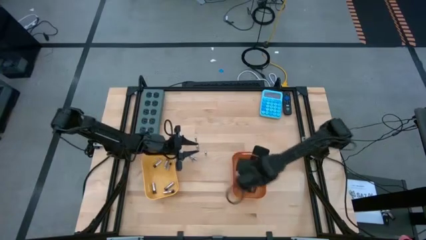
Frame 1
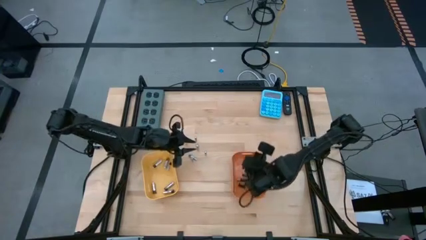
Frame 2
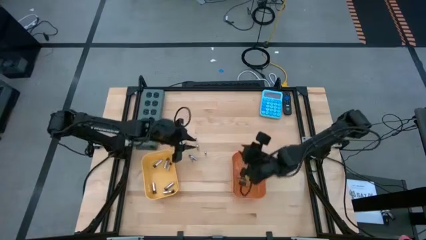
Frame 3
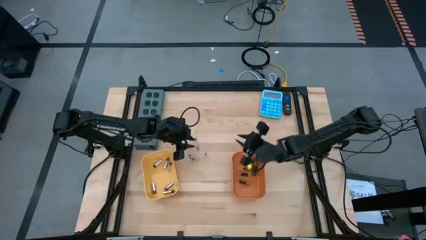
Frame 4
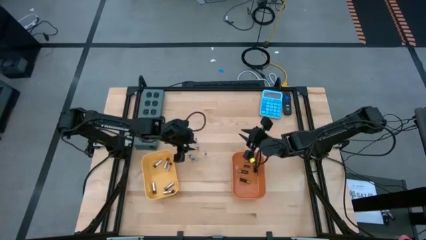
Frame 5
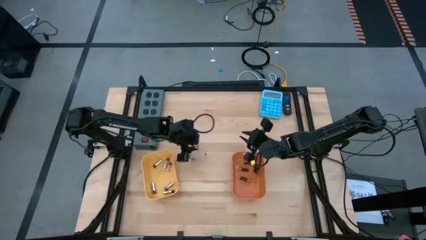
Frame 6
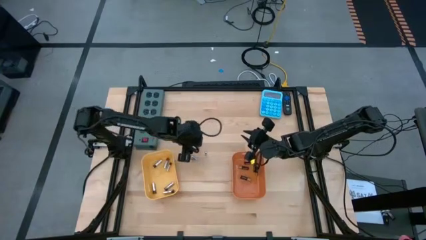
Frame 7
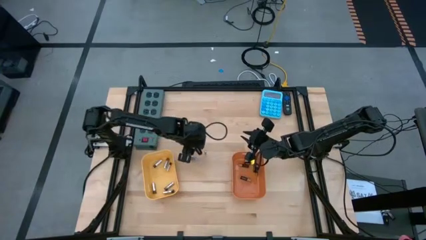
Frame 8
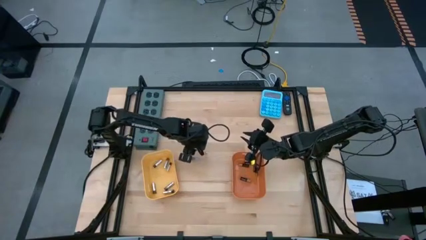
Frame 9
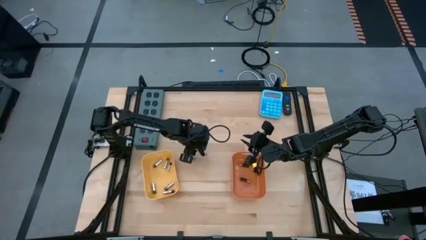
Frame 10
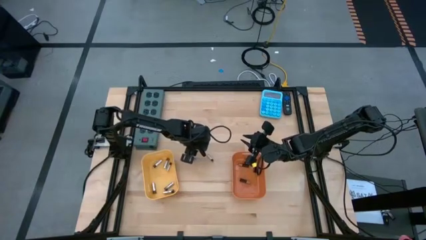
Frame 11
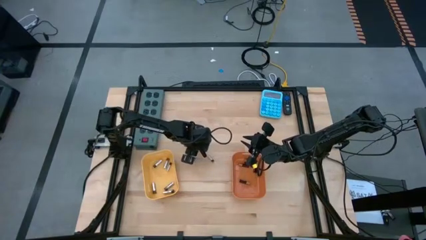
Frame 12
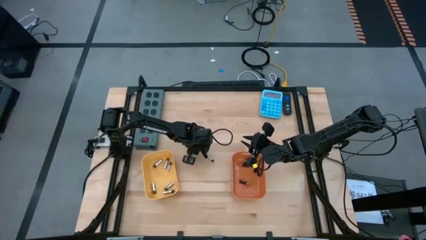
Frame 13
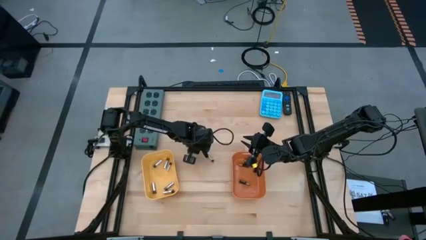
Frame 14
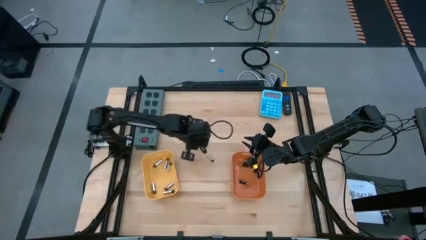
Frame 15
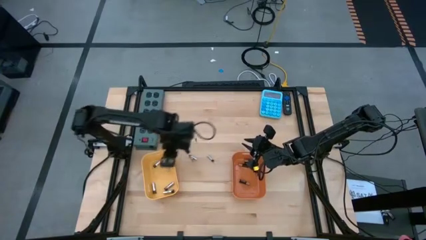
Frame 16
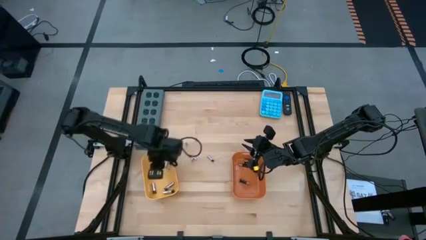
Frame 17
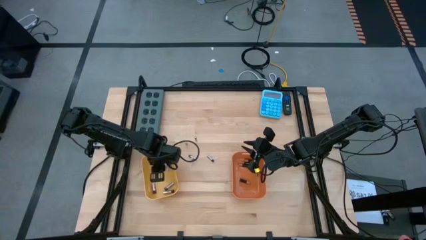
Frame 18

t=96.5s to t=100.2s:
Task: Sort batteries
Put the silver battery into the yellow bin

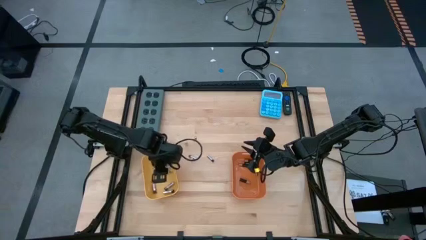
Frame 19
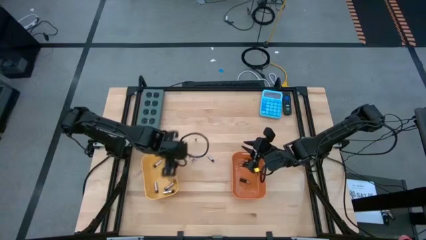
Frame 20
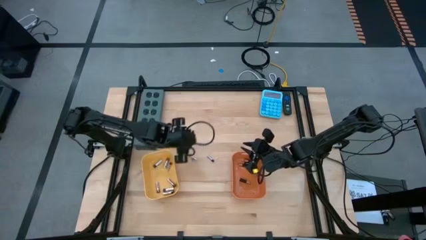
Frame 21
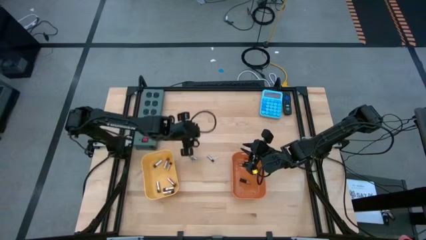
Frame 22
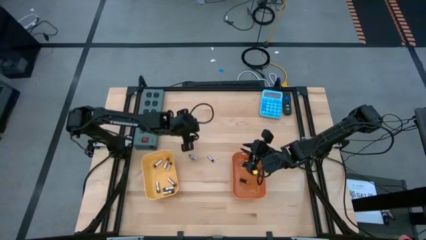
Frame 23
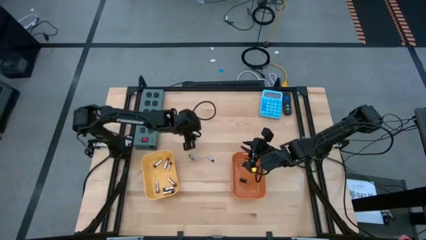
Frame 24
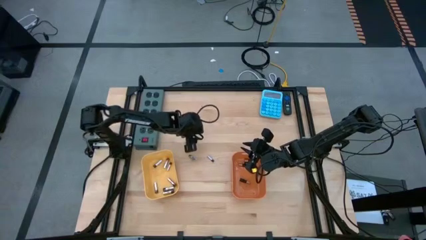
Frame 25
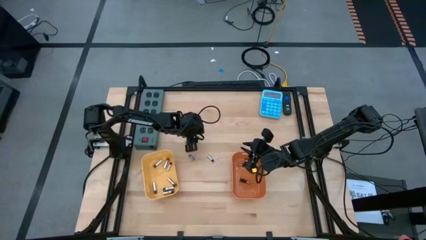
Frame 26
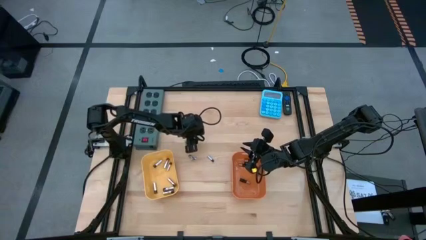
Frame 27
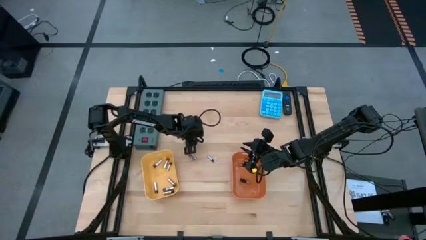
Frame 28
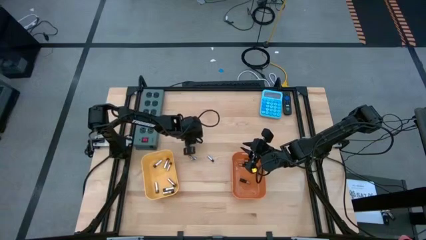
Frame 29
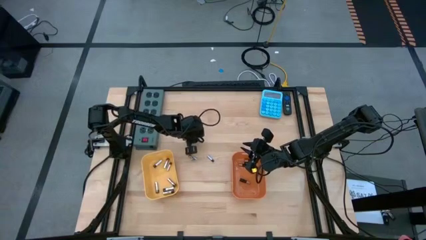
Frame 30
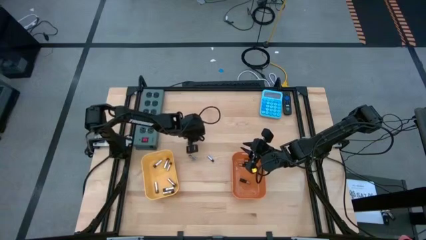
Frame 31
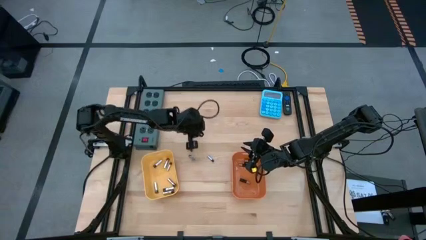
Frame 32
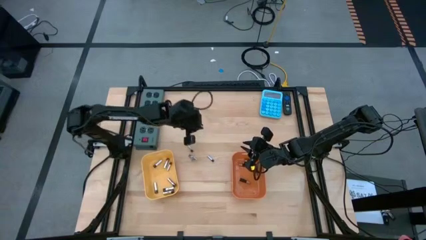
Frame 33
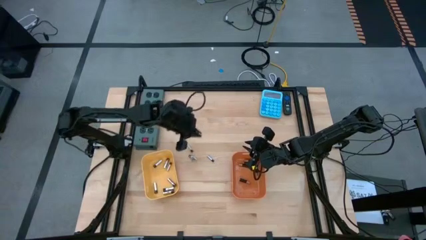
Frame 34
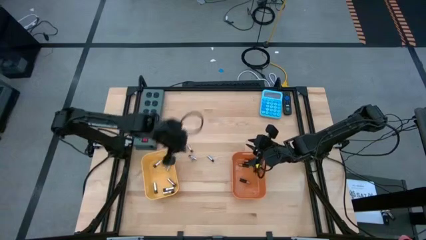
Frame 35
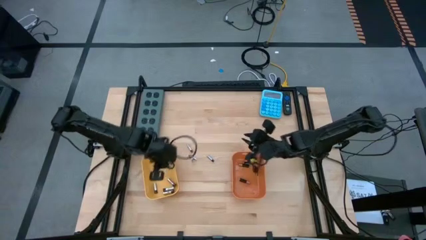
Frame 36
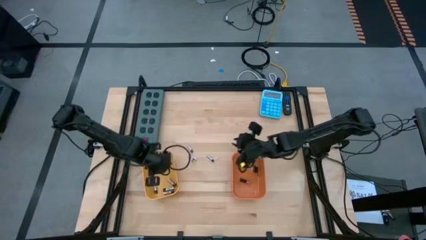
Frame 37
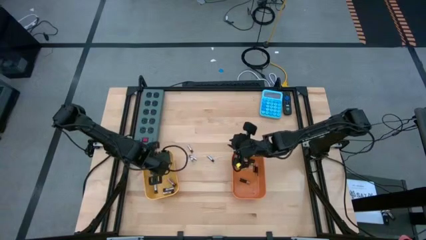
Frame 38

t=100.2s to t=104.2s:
Put the silver battery into the yellow bin

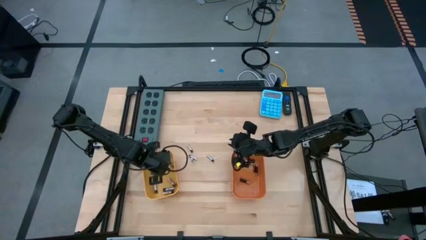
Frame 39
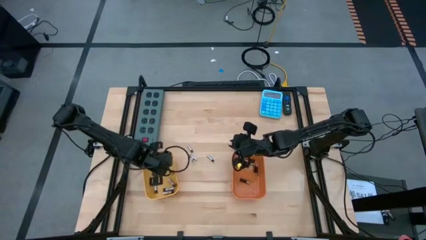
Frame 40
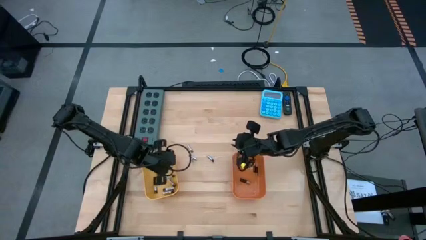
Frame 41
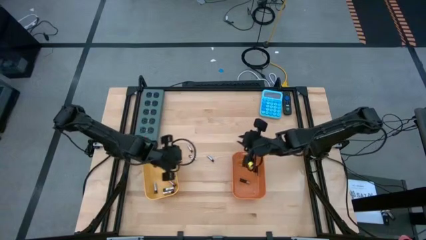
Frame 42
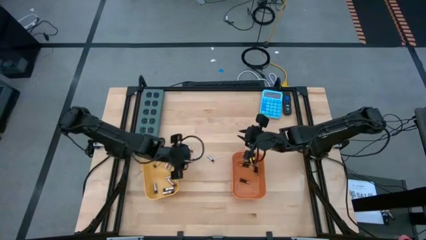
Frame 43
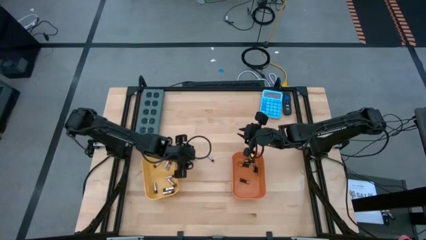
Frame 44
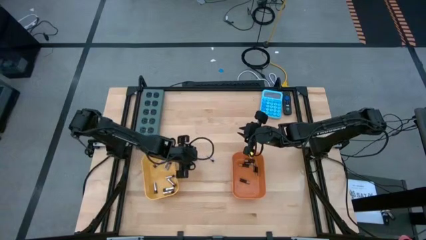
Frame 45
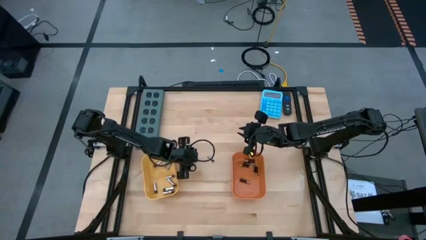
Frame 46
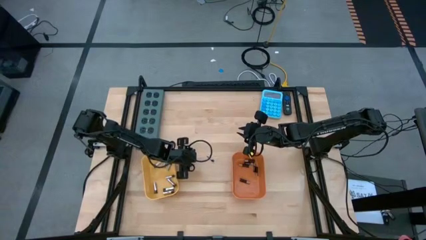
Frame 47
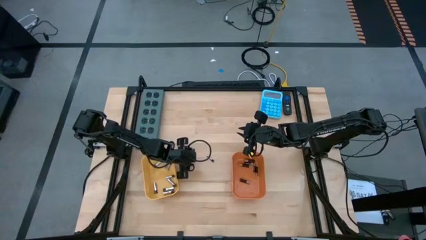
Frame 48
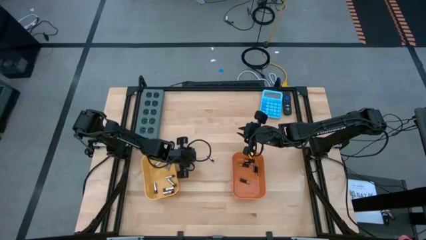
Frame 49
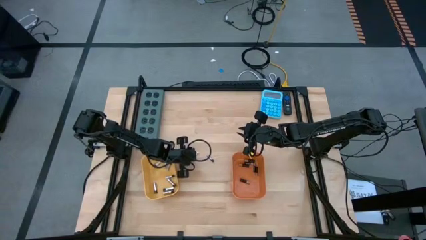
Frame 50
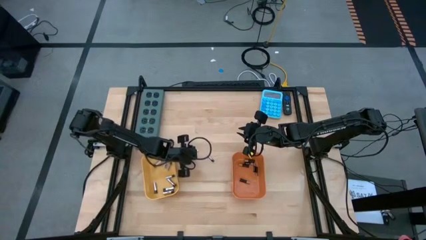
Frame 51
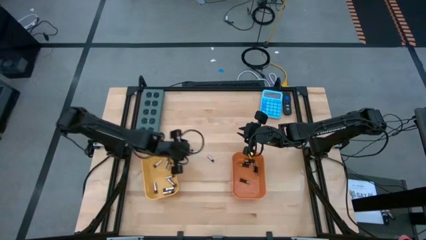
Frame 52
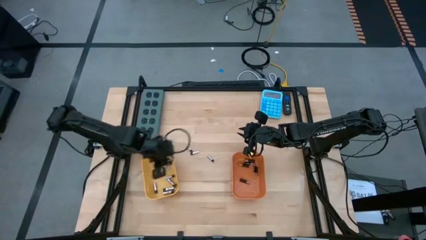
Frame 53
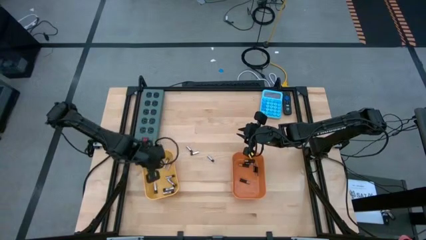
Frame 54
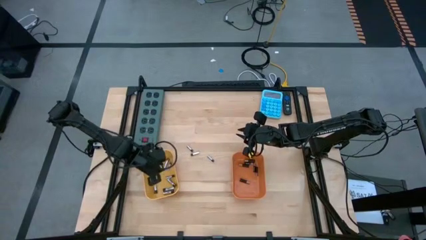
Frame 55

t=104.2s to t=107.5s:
Put the silver battery into the yellow bin

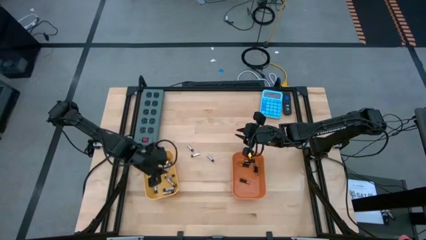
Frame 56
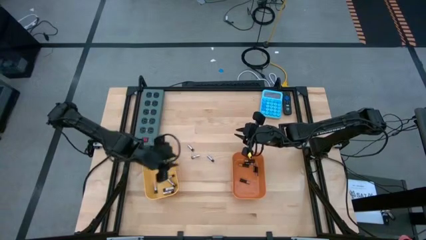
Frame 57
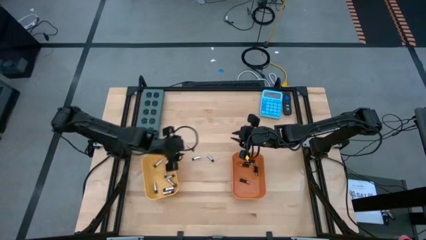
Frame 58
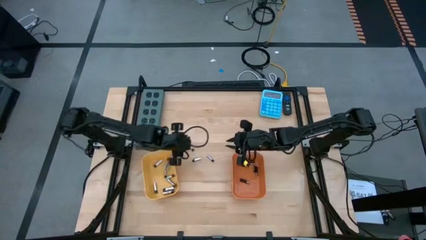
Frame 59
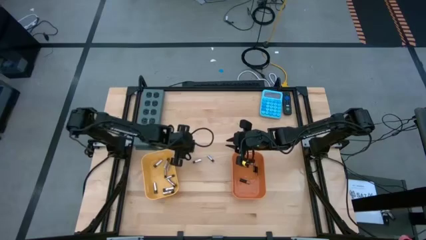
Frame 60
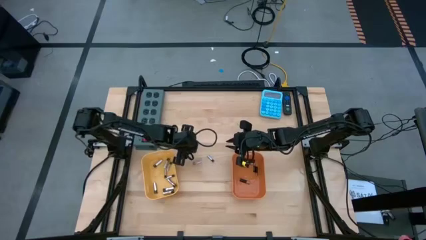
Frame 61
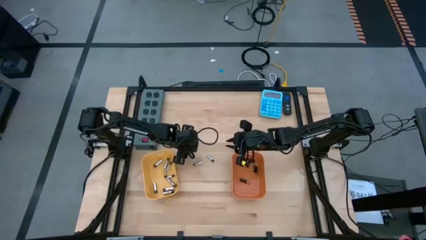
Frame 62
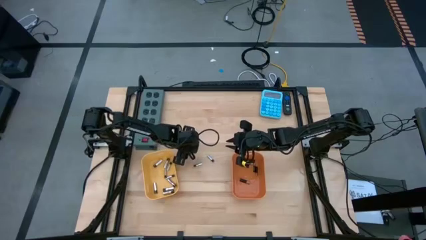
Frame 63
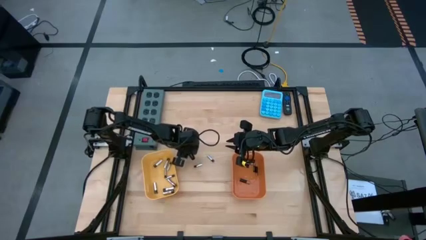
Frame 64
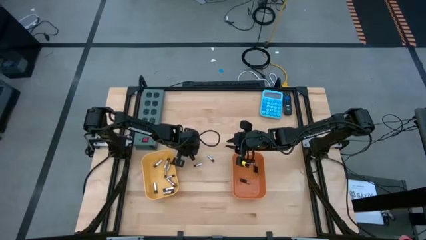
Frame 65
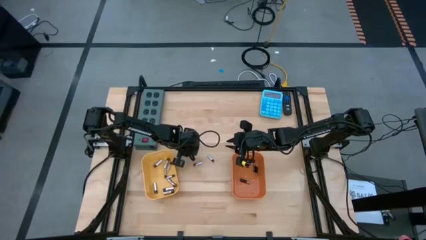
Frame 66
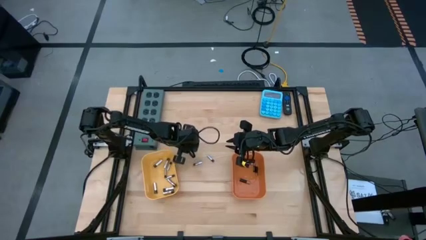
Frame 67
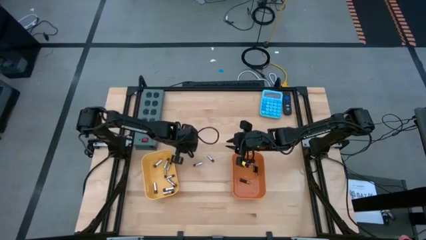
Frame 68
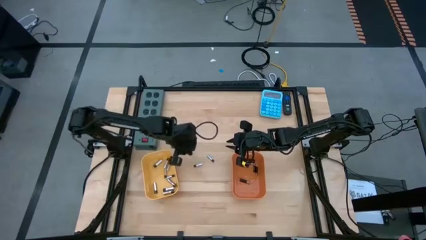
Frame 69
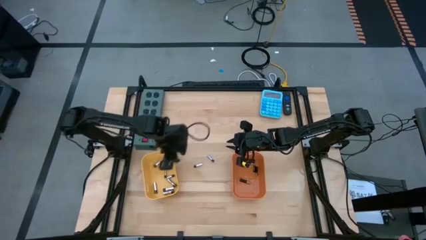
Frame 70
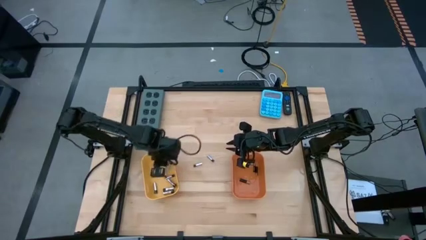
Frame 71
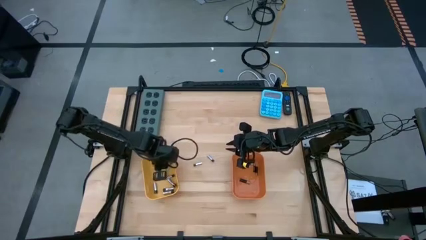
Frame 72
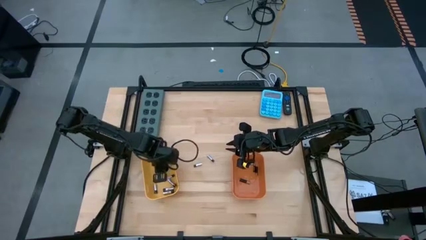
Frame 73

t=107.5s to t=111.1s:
Put the silver battery into the yellow bin

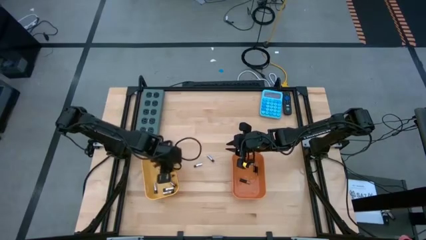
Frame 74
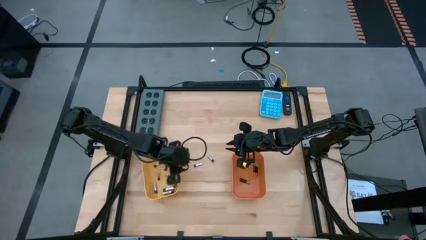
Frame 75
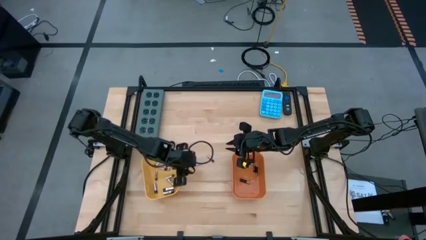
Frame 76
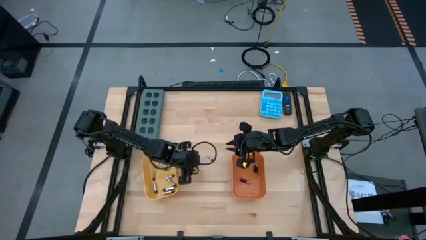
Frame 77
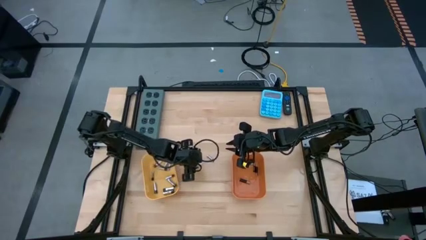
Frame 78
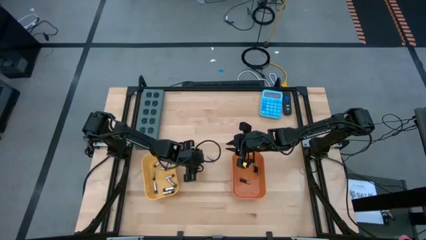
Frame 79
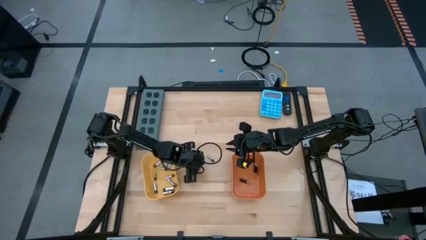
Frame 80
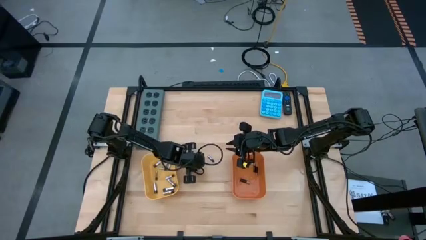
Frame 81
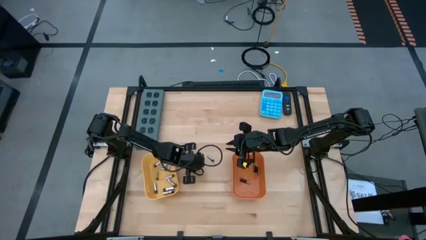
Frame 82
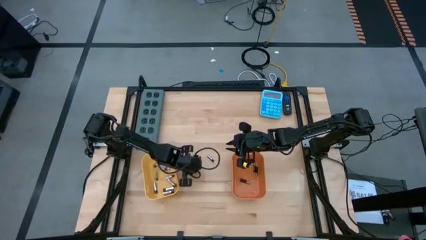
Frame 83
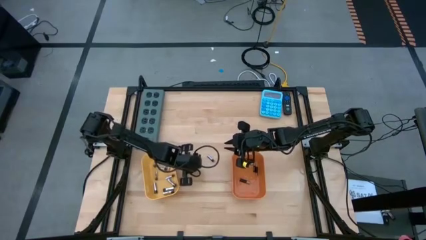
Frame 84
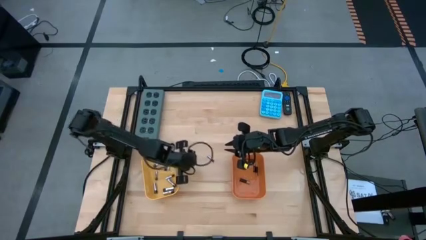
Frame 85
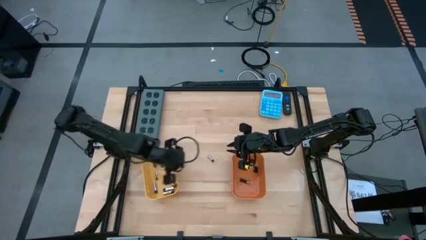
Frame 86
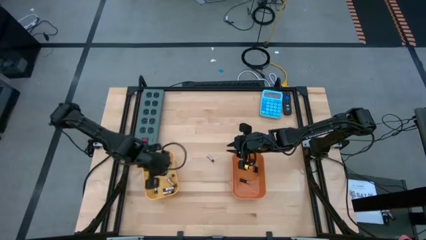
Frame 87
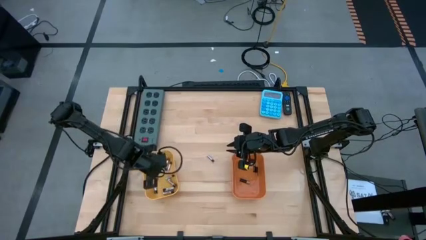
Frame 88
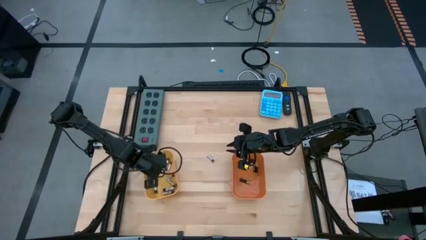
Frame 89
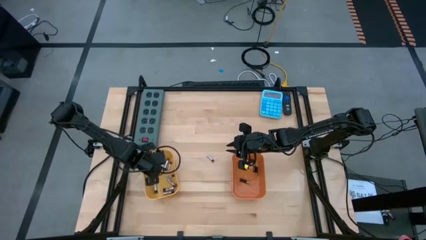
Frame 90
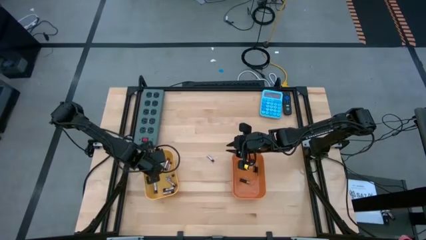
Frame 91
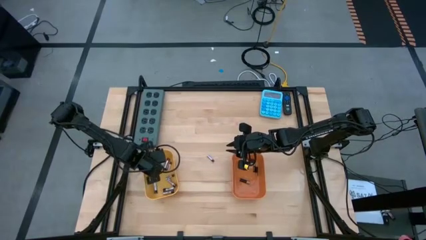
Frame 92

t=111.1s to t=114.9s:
Put the silver battery into the yellow bin
